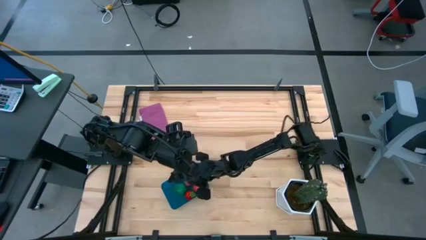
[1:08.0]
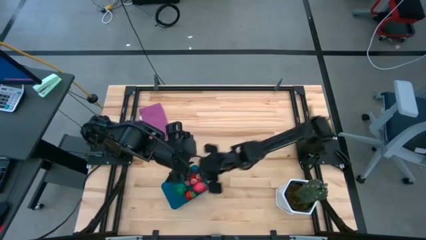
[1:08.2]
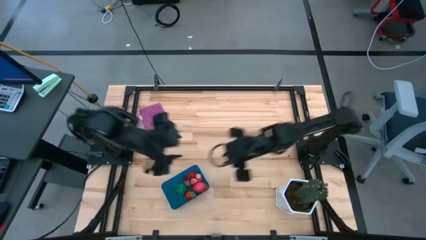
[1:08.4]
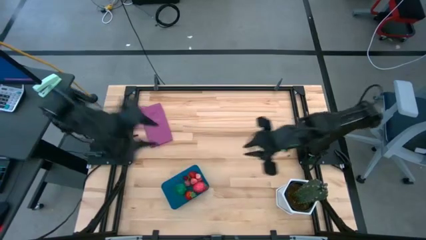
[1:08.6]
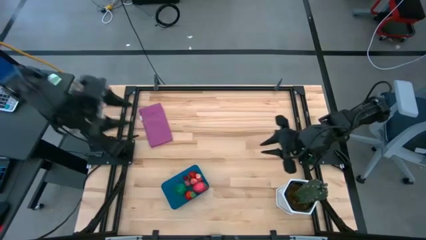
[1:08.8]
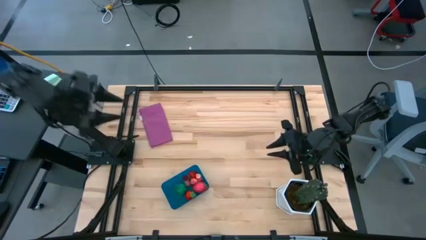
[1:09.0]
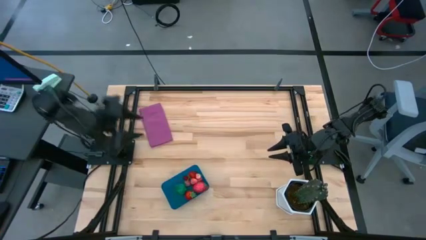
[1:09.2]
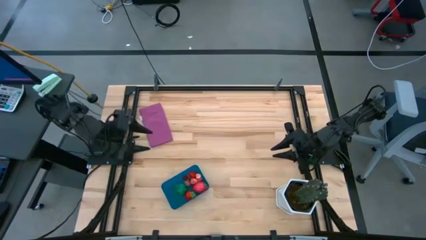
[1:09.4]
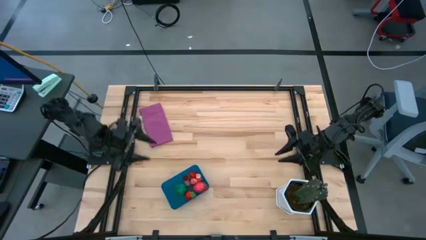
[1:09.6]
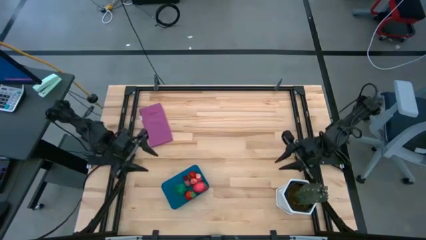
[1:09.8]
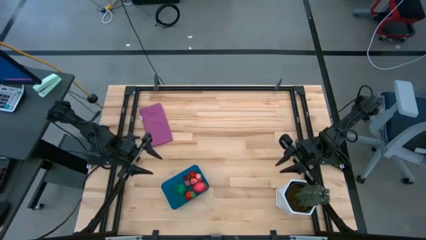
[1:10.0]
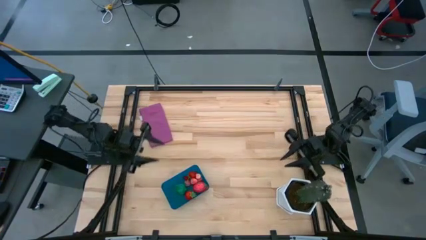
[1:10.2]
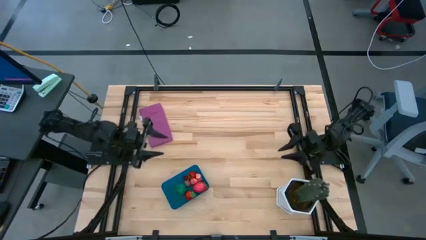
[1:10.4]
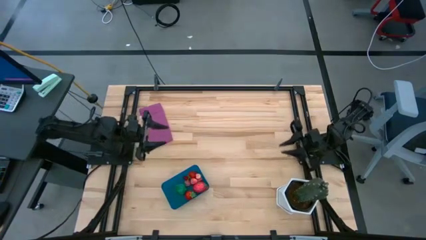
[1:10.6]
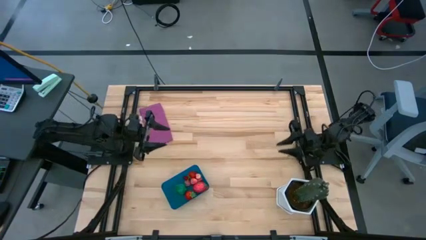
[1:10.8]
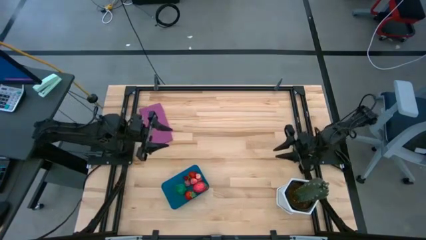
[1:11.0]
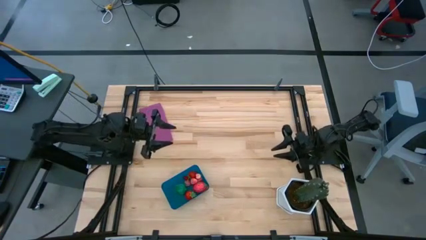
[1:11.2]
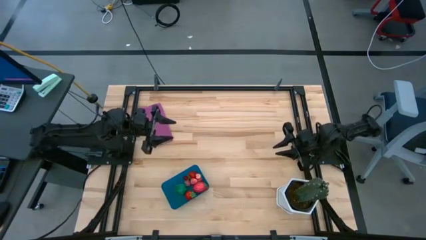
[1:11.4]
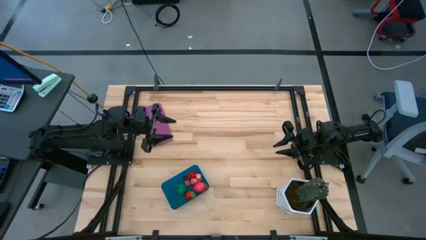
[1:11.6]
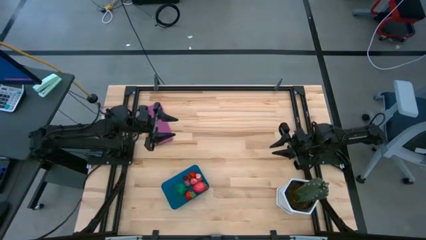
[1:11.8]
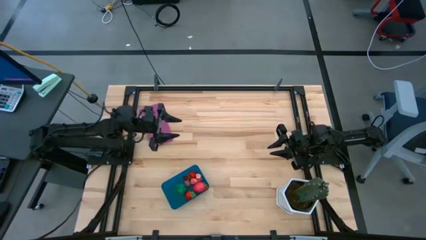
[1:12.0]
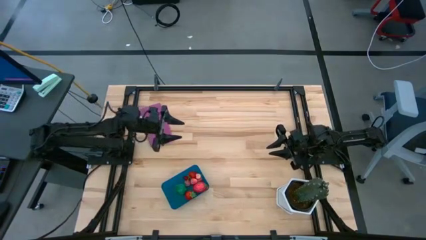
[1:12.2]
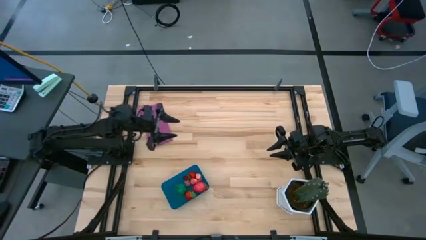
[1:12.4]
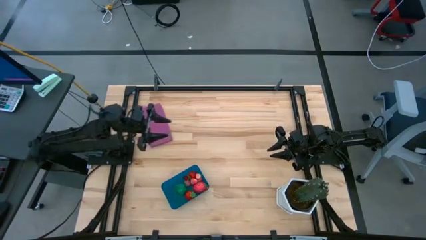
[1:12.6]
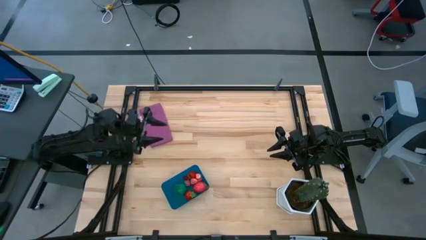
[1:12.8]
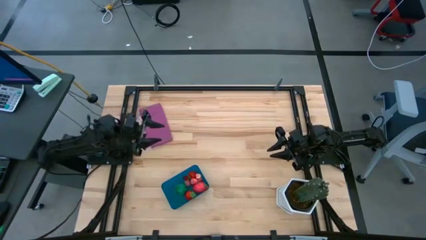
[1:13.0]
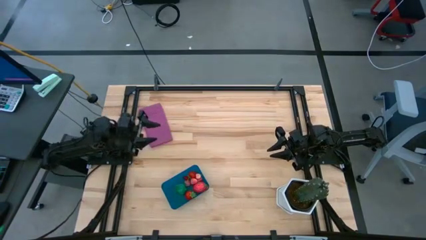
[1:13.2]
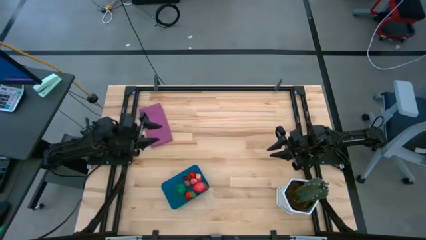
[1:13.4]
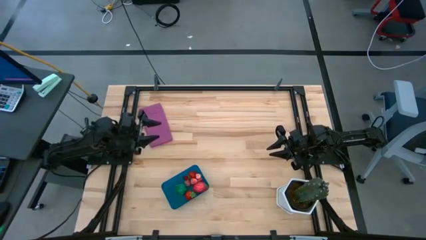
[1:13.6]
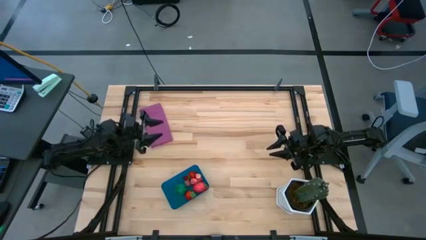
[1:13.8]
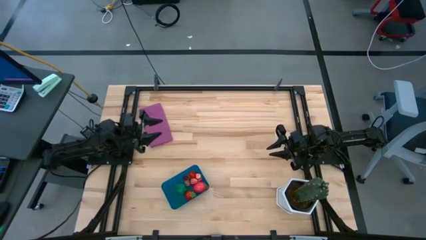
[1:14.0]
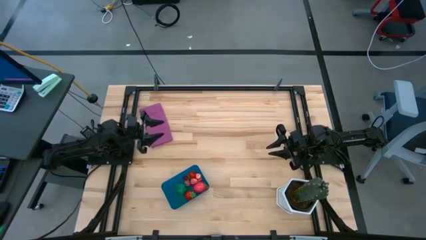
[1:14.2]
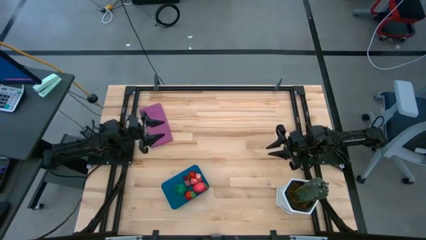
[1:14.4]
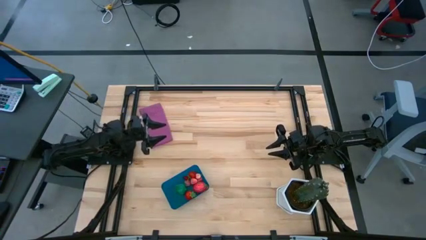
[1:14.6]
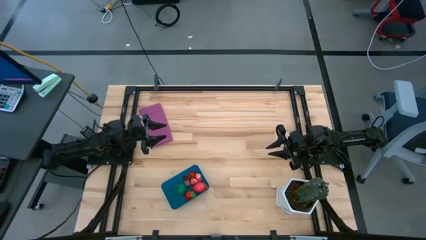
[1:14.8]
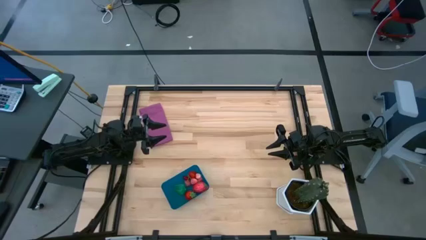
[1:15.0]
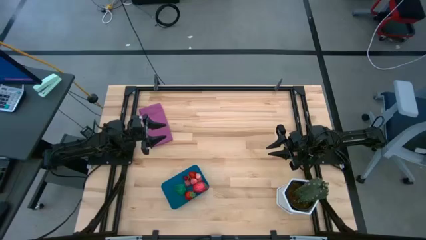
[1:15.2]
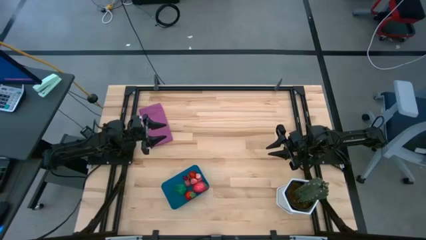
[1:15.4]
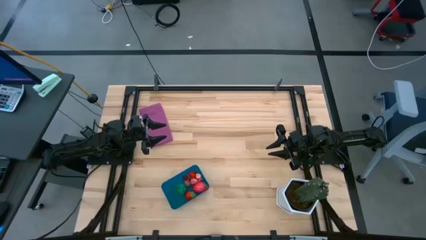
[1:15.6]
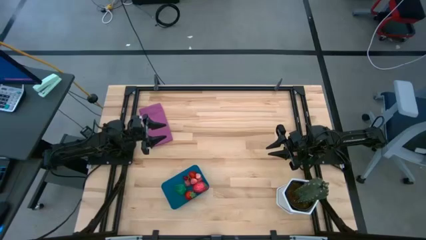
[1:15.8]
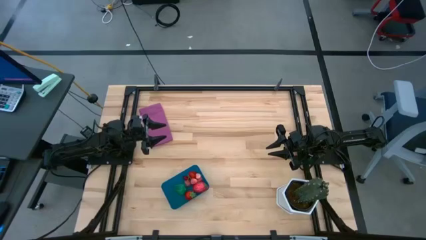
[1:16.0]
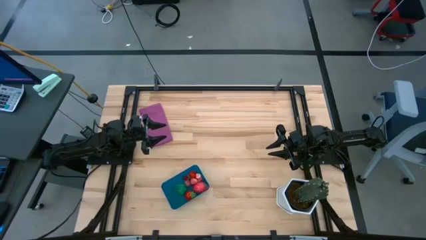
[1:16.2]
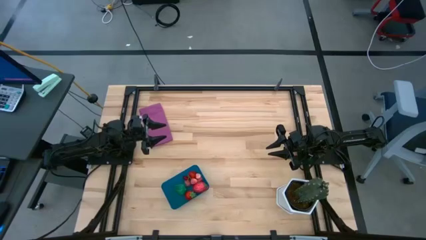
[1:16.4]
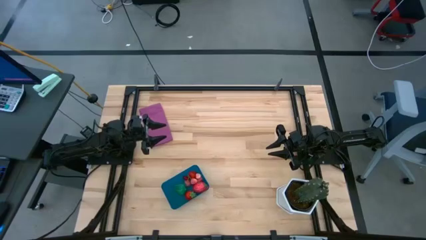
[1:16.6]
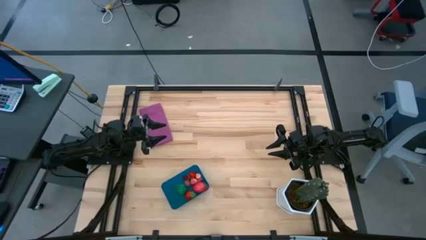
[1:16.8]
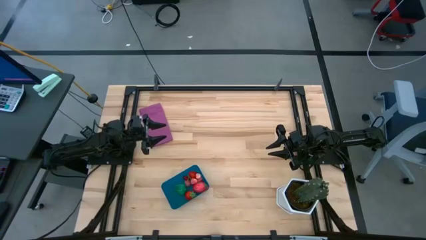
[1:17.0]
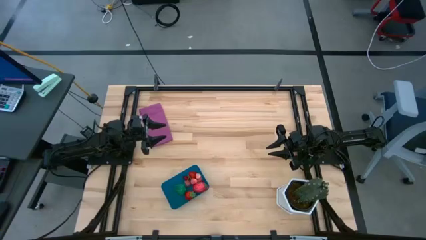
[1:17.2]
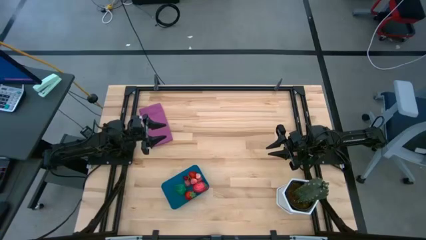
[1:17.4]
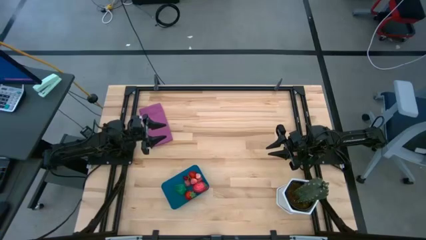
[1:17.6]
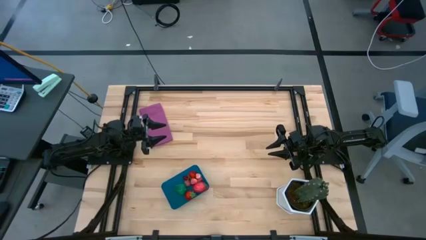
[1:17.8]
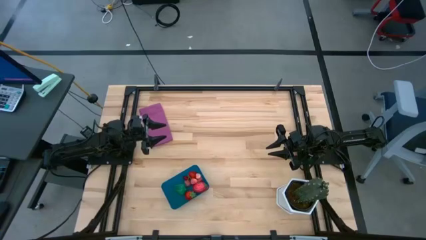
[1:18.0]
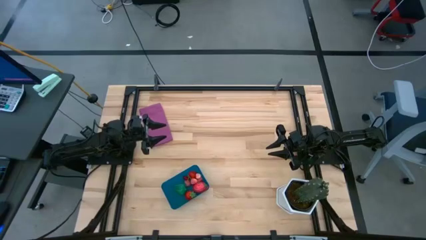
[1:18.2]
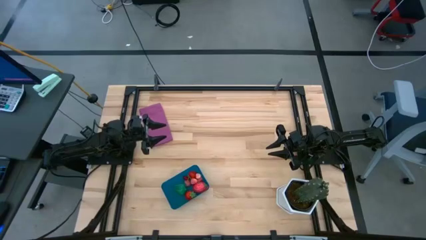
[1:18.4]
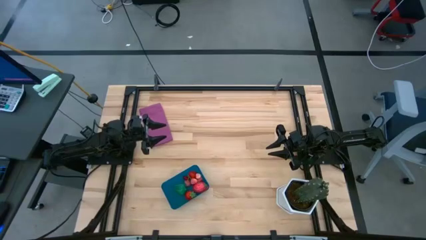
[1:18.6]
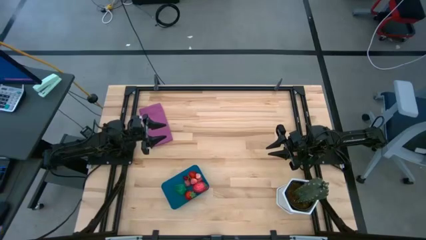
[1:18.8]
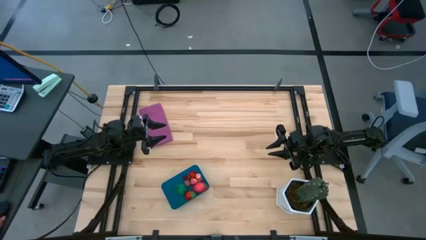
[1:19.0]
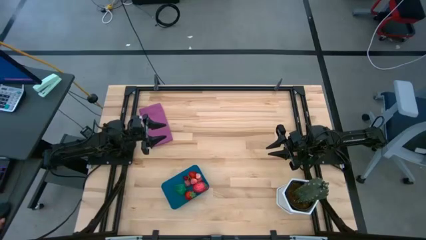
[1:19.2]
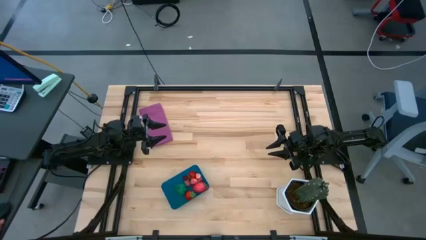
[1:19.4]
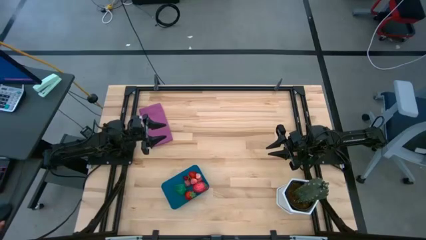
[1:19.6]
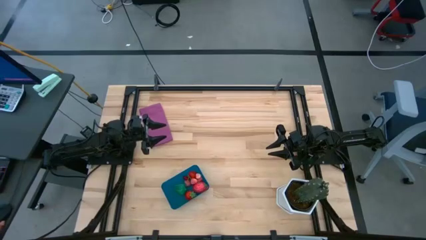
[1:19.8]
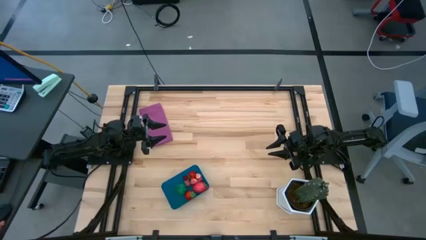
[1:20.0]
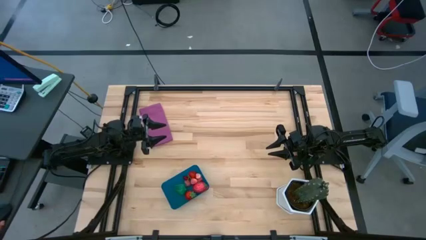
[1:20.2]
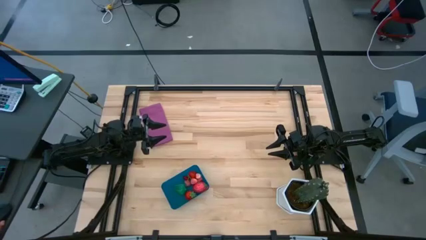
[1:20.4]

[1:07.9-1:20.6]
Task: Pick and placing Produce into tupperware
Return to Home Position

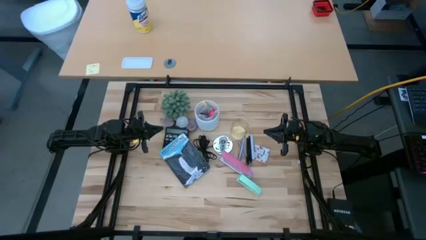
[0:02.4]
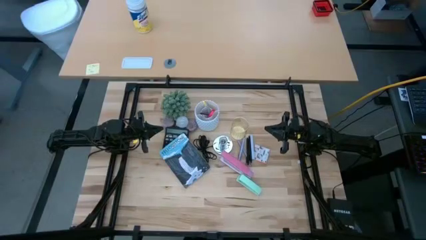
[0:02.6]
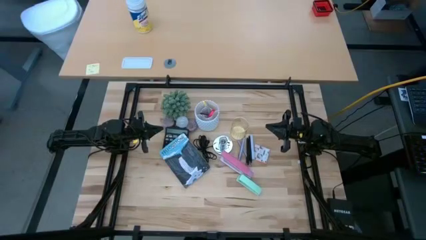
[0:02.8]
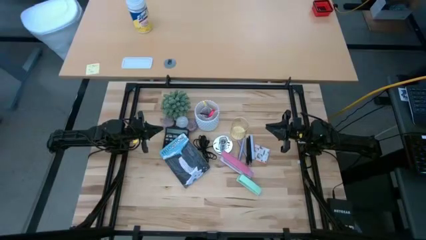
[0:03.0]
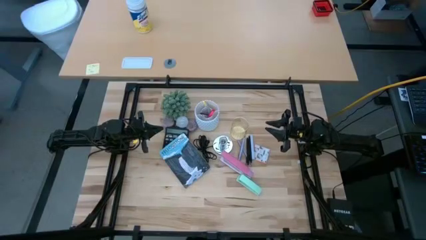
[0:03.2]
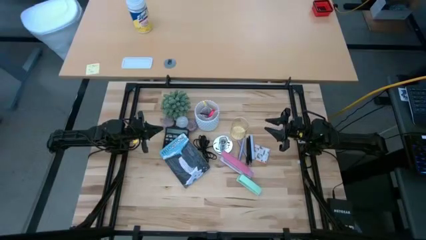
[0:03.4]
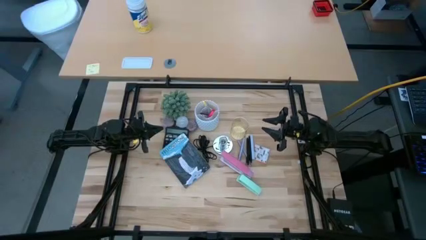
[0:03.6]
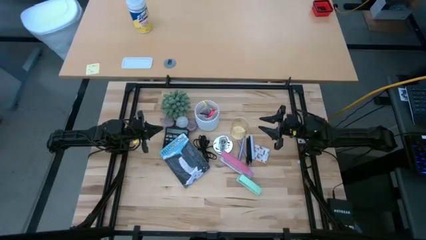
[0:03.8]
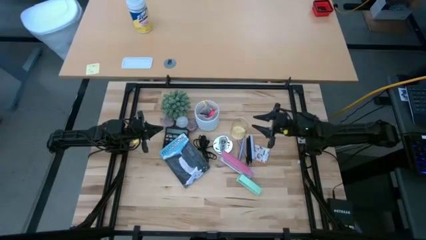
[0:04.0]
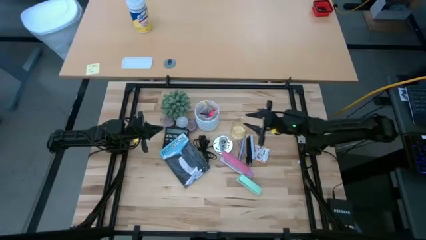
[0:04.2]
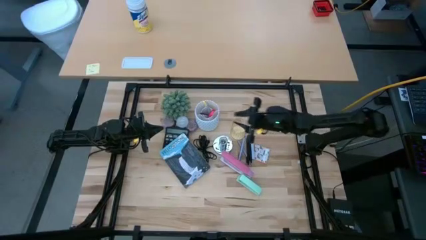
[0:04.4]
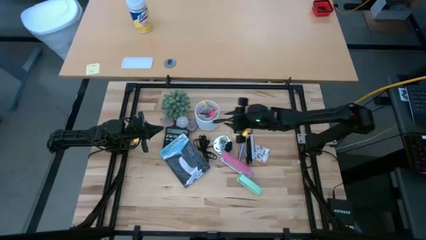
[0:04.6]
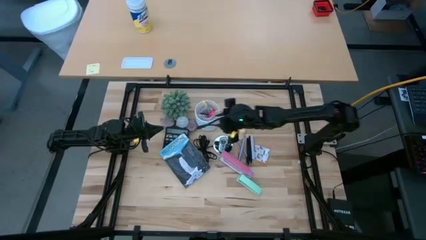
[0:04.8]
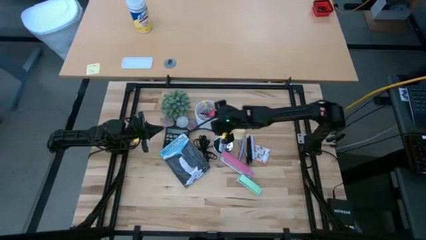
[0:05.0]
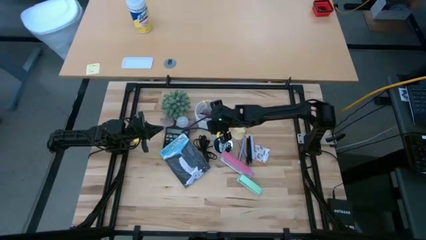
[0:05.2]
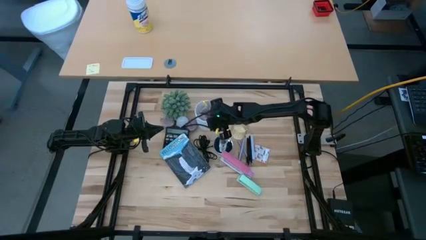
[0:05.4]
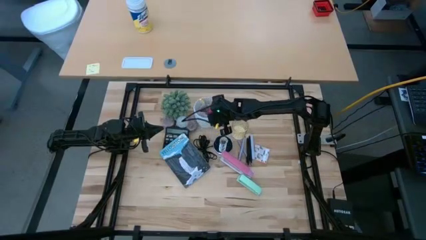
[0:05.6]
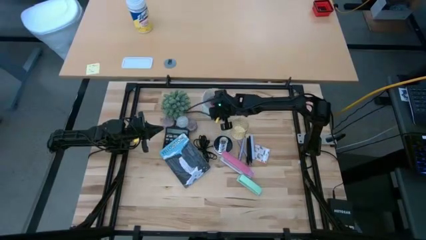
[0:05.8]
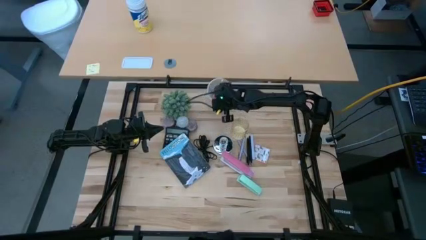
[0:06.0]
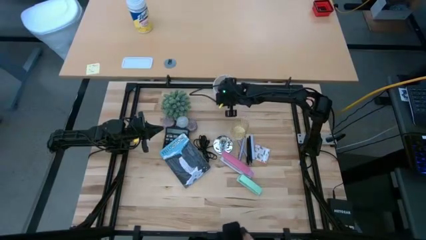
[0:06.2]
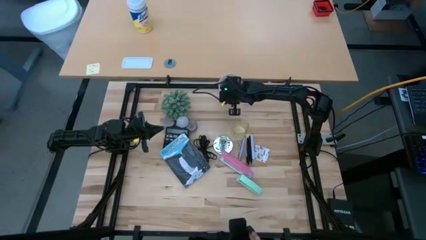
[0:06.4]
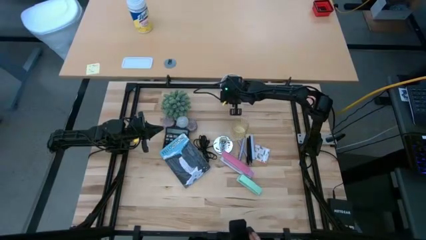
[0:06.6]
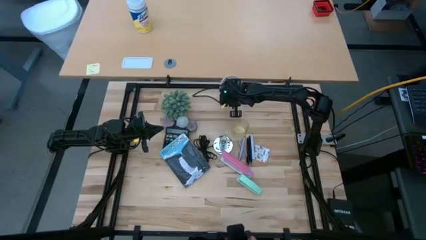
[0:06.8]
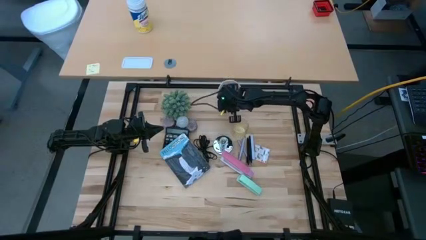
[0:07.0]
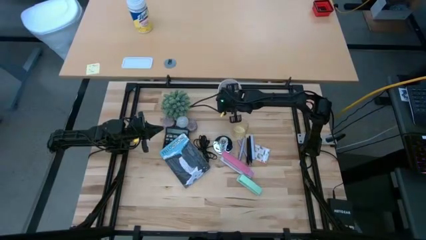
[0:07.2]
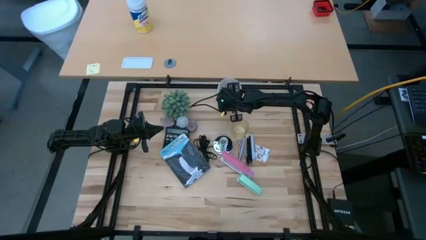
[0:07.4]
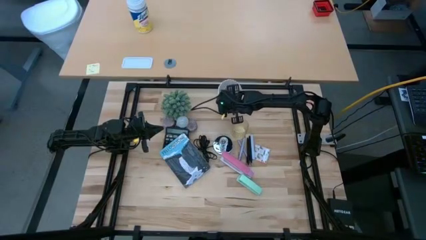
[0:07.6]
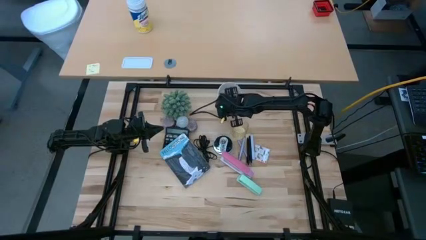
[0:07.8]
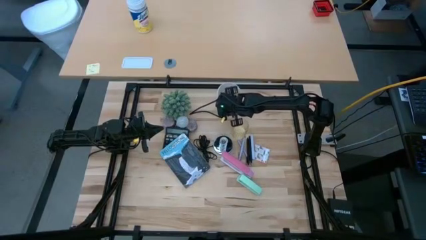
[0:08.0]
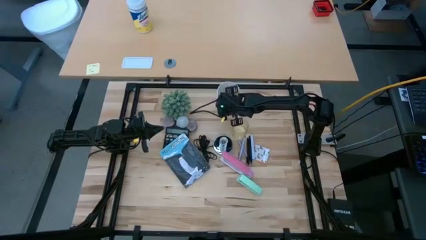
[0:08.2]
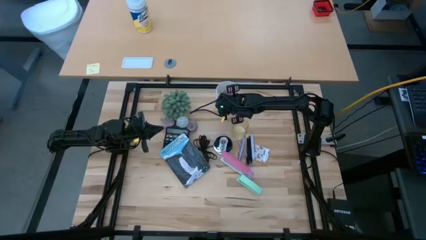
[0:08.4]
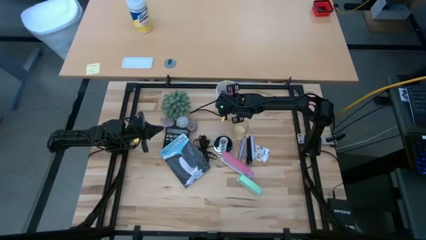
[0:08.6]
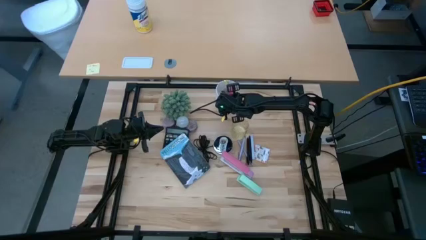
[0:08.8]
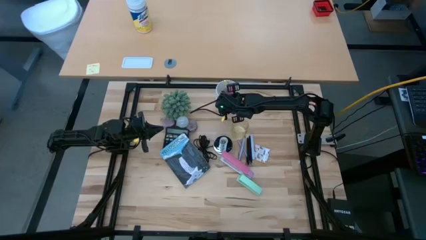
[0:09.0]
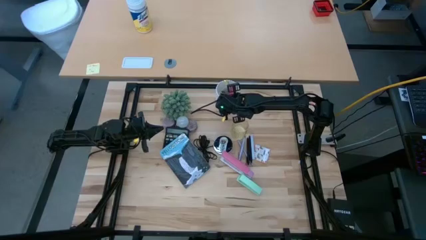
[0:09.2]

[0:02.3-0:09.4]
Task: Screw lightbulb
Adjust the white pen holder
